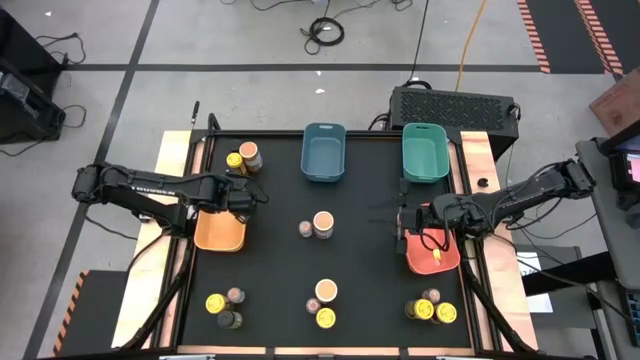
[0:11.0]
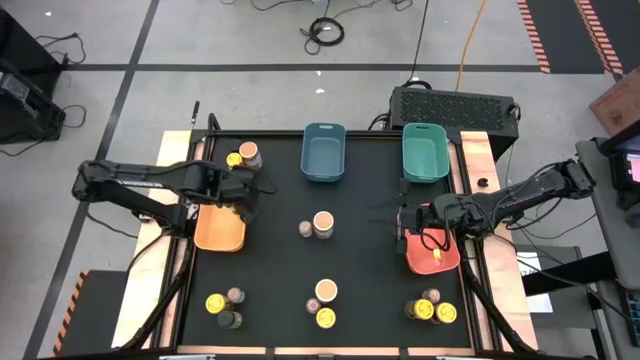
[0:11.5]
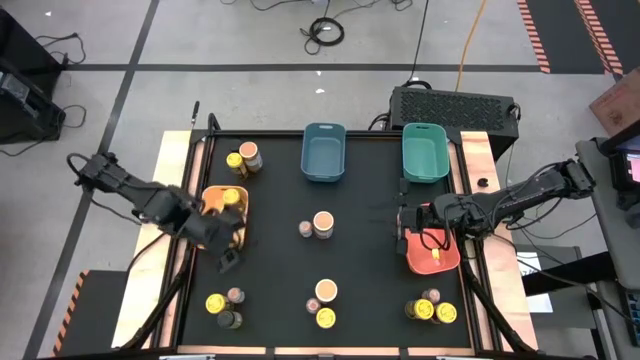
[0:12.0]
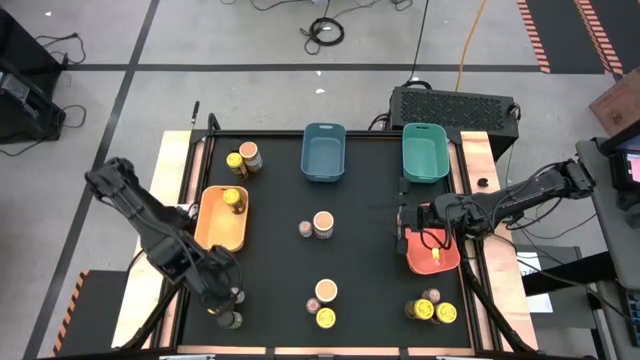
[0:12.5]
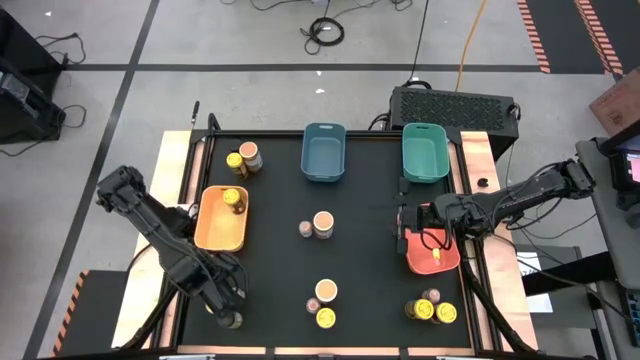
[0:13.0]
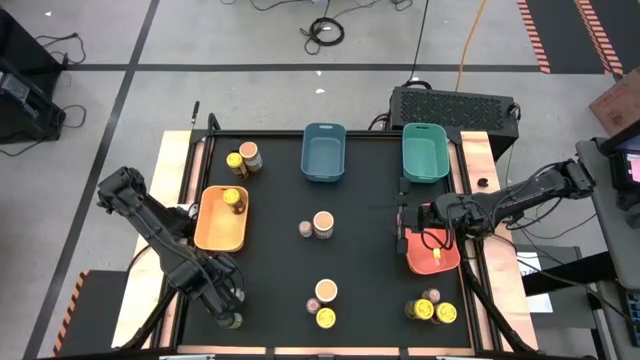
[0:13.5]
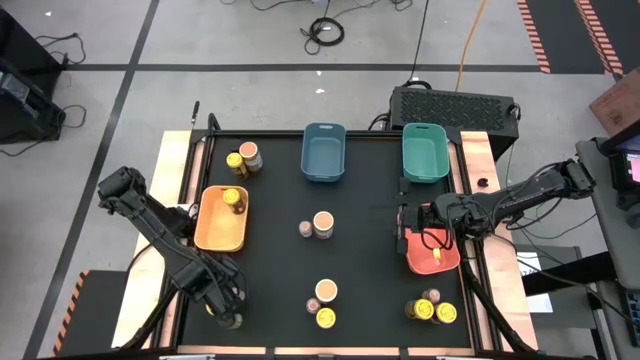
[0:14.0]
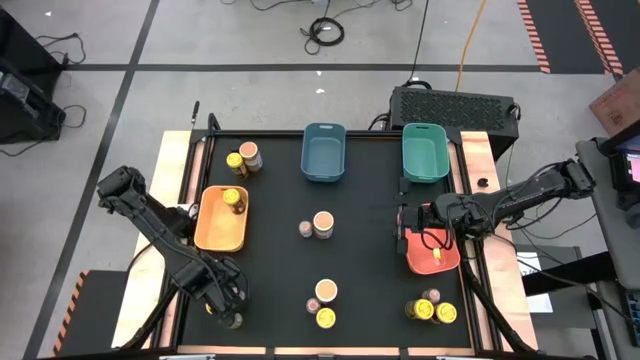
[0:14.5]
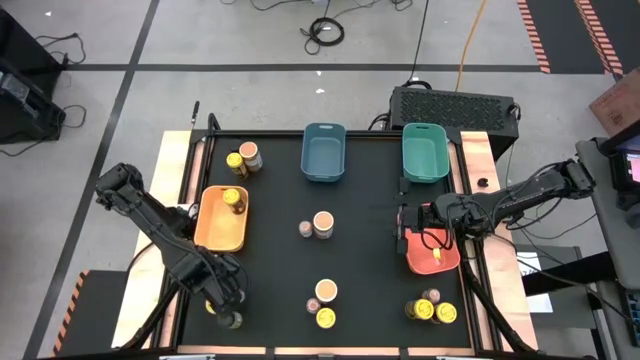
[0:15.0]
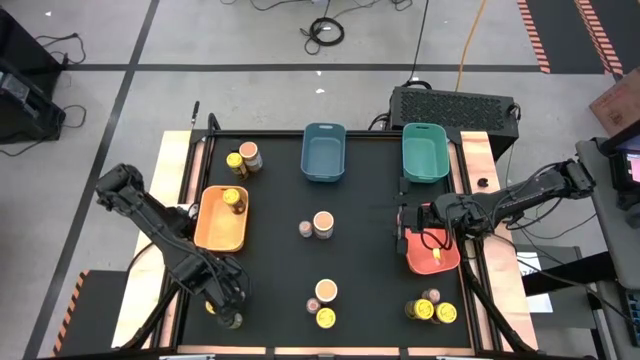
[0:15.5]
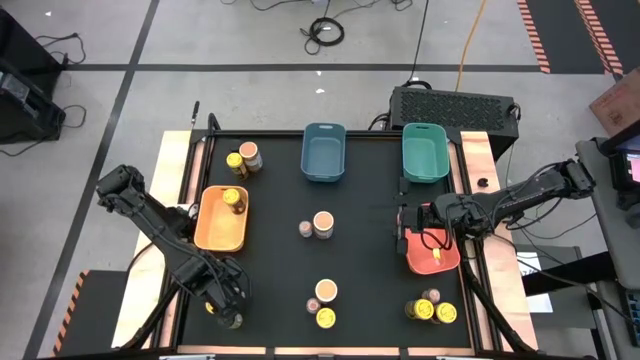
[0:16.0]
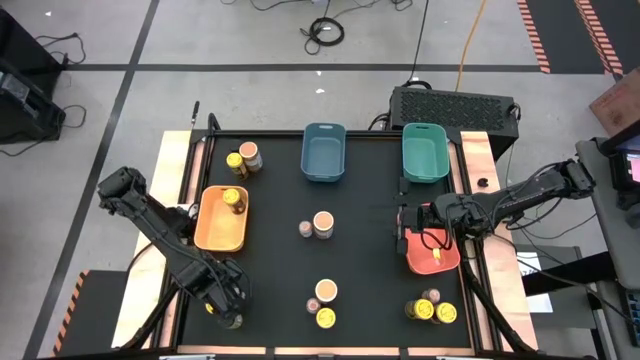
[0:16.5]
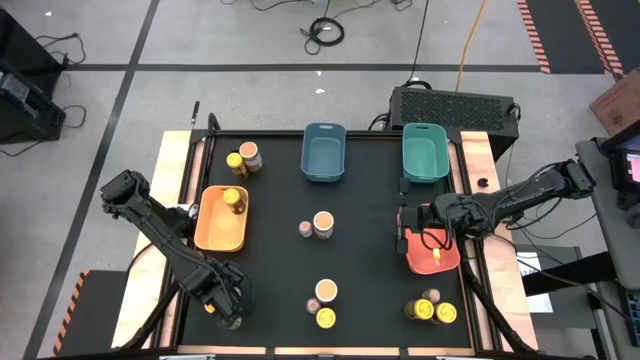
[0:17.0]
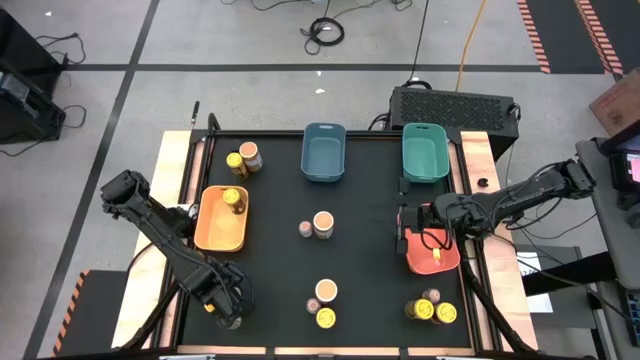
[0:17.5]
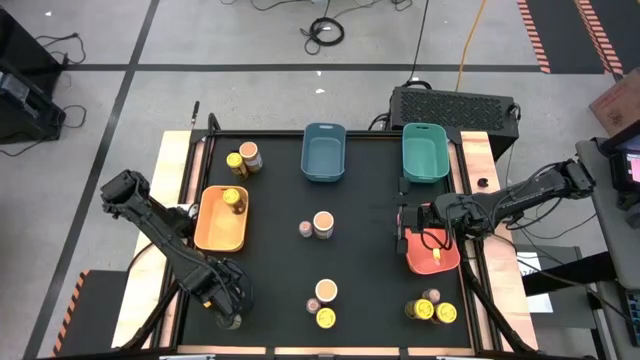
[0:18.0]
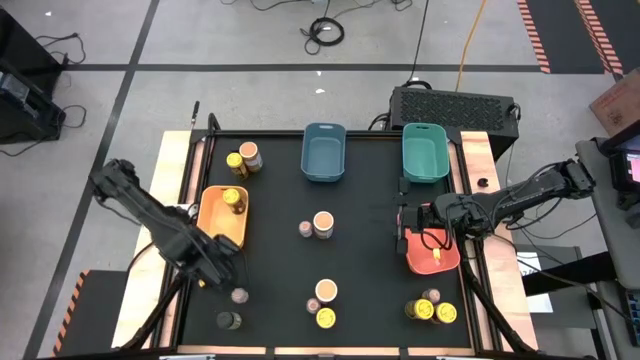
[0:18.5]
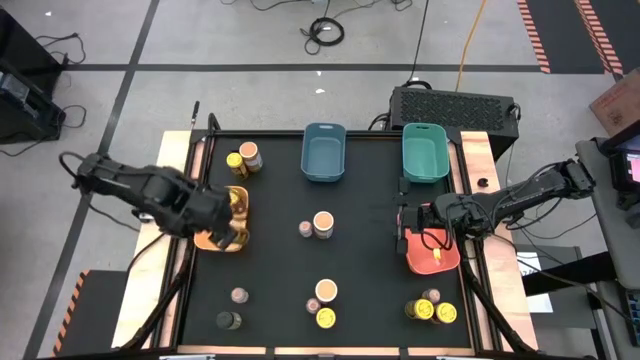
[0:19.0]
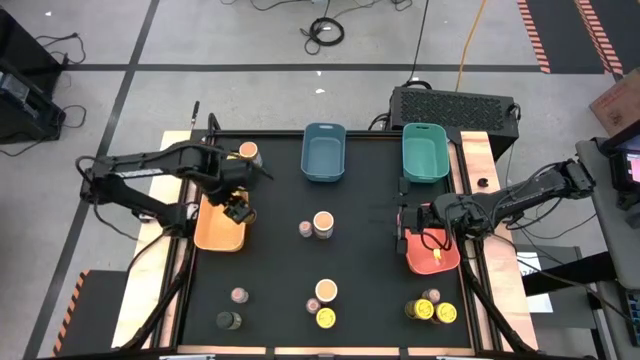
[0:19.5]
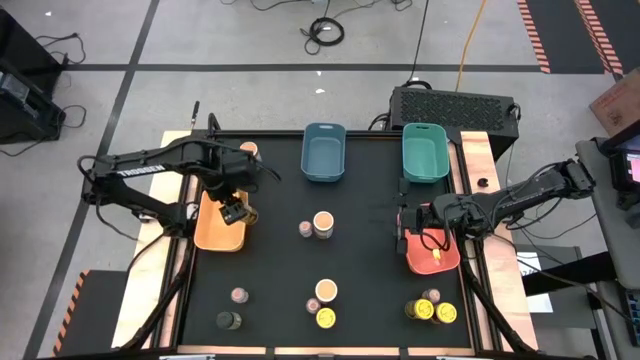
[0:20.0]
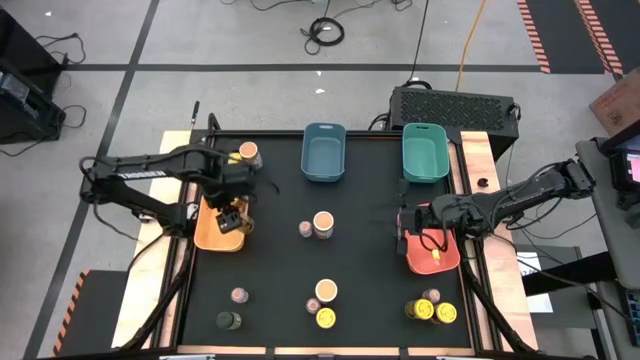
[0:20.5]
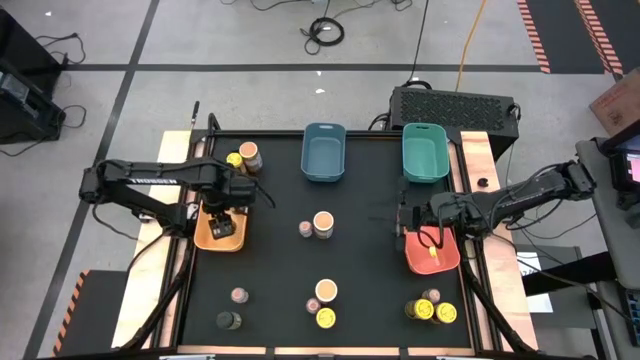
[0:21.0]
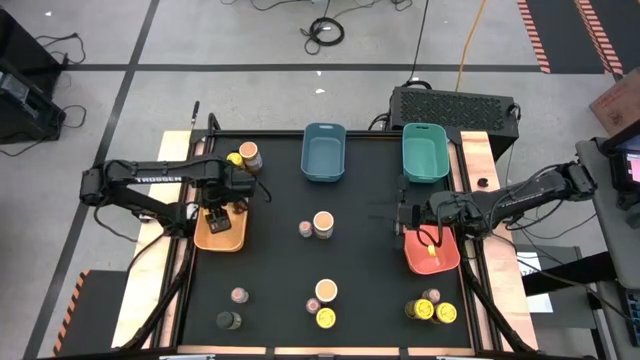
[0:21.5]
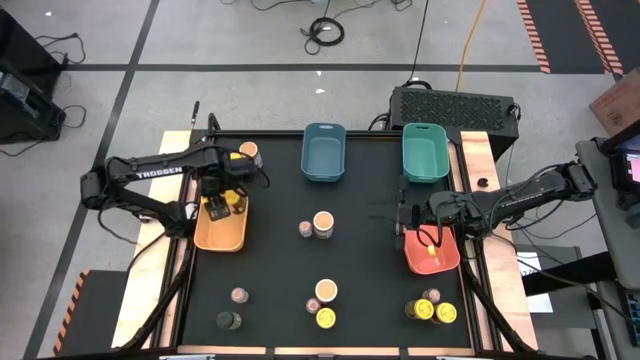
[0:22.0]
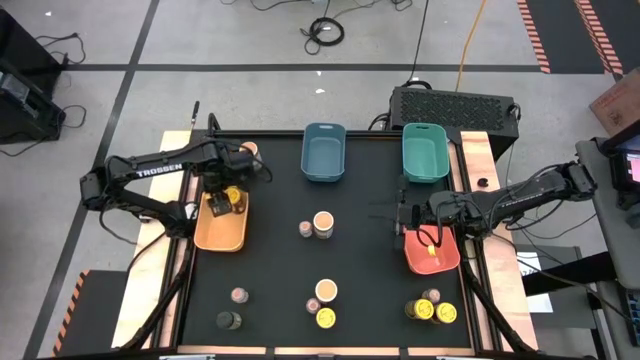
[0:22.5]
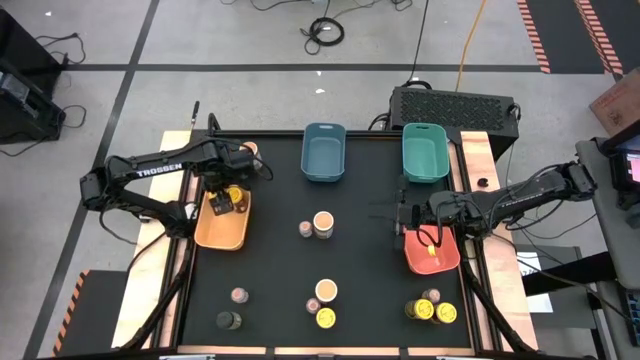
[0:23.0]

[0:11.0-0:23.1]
Task: Sort spices by type
Put the yellow seasoning can into the yellow bin

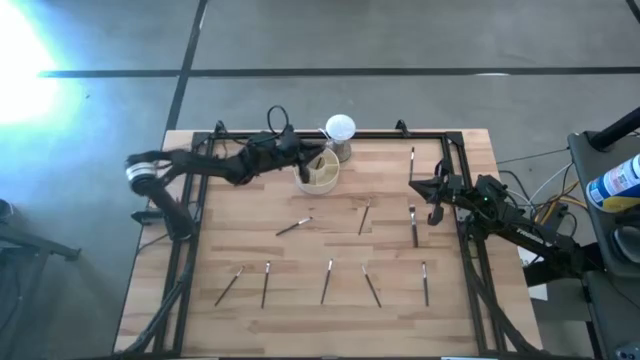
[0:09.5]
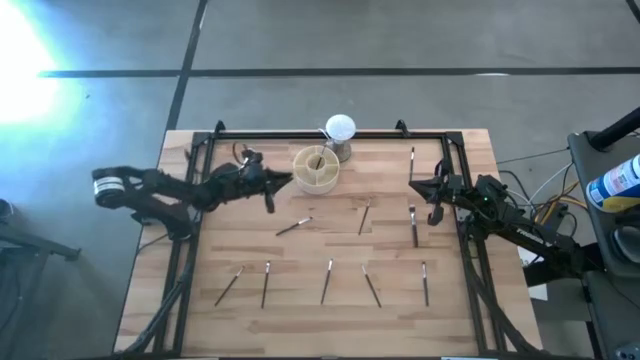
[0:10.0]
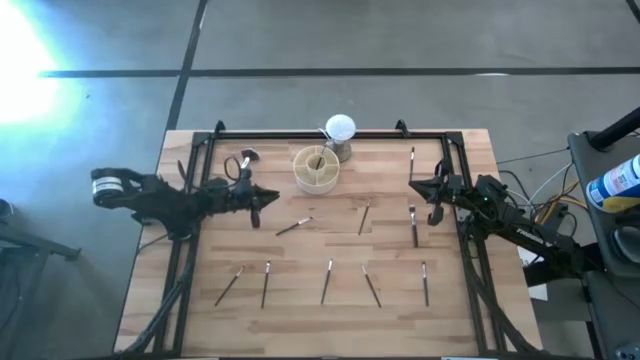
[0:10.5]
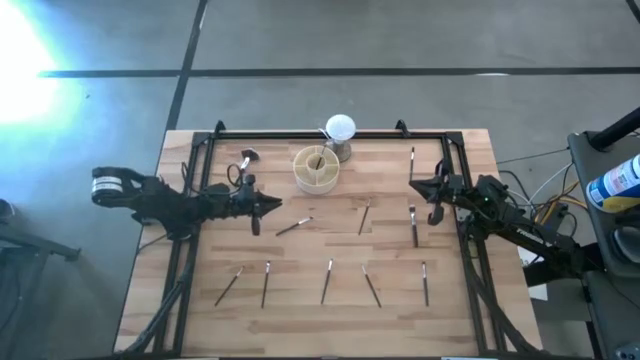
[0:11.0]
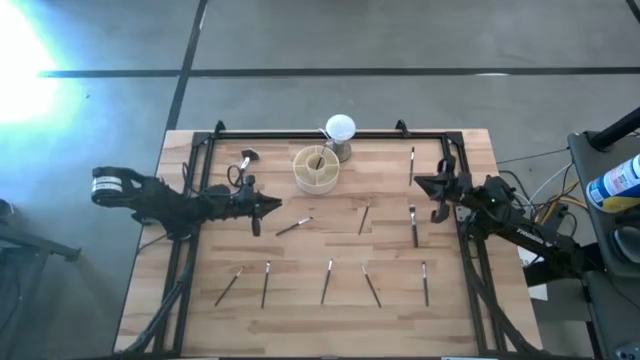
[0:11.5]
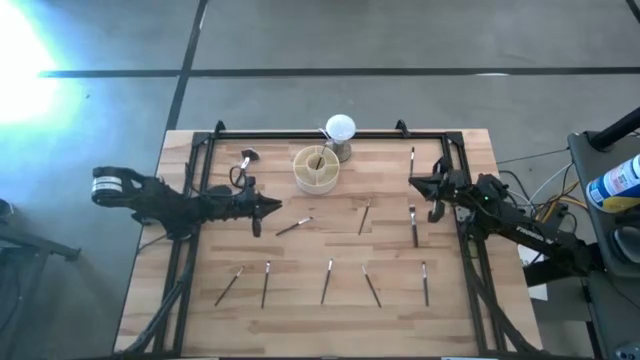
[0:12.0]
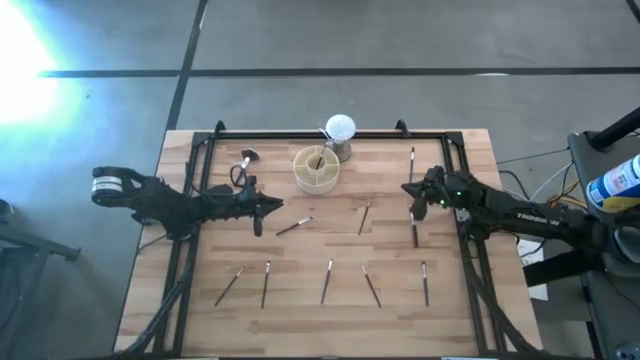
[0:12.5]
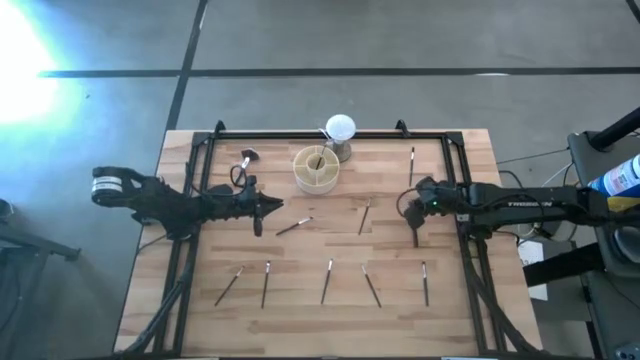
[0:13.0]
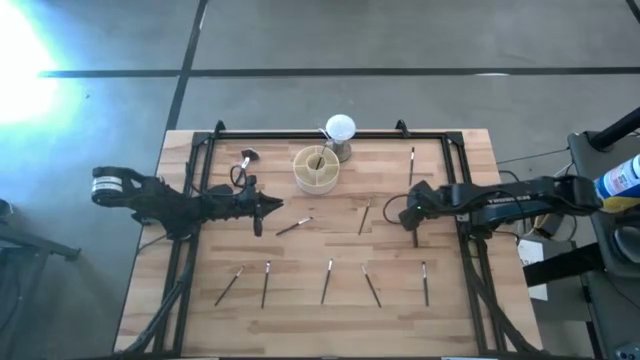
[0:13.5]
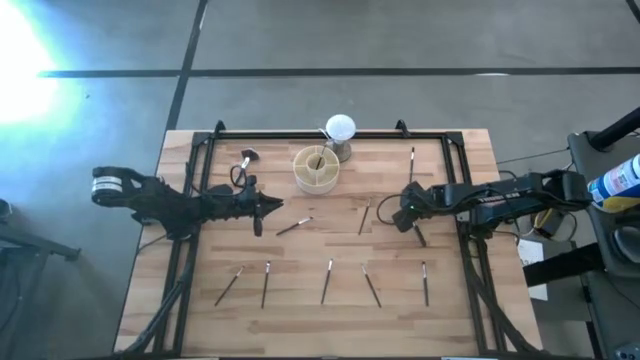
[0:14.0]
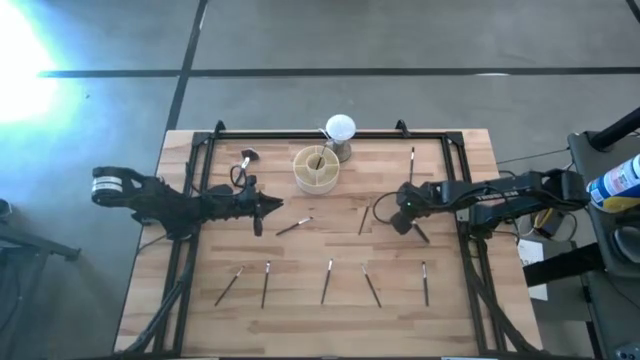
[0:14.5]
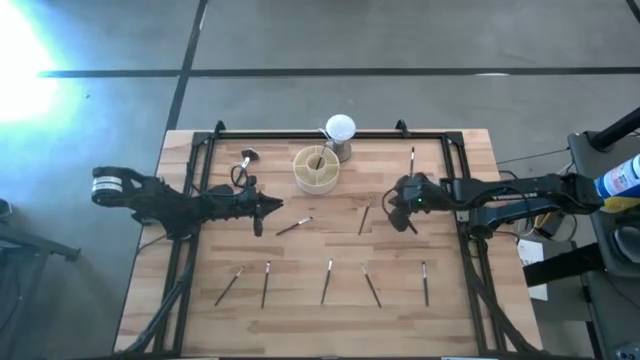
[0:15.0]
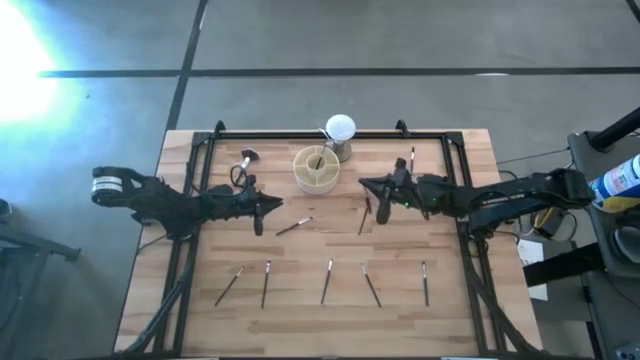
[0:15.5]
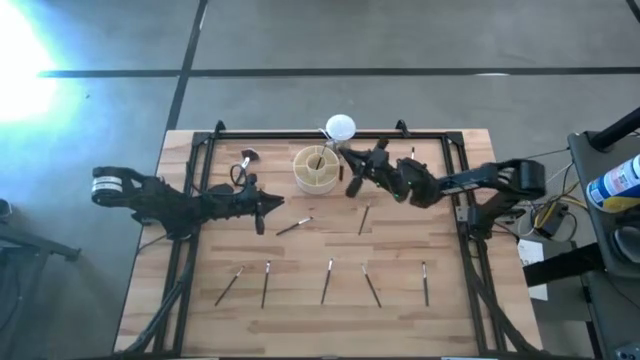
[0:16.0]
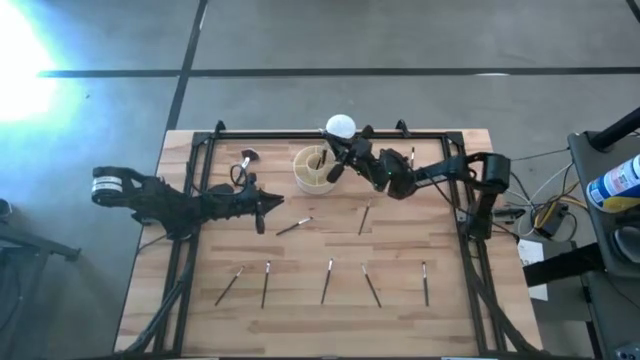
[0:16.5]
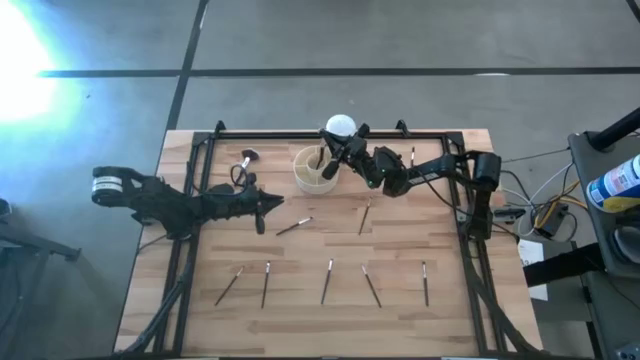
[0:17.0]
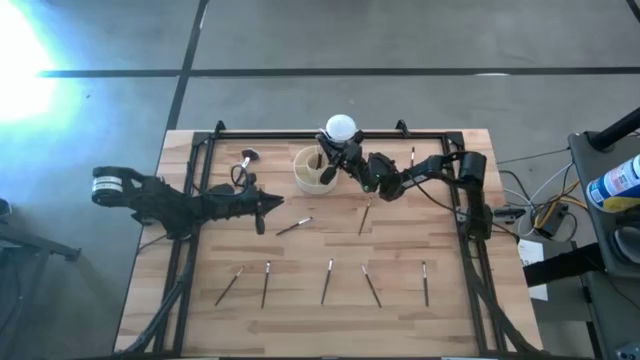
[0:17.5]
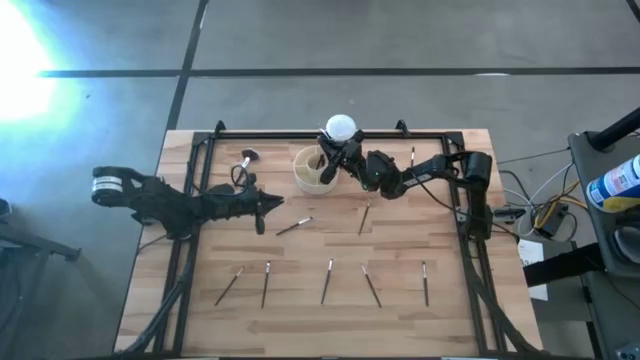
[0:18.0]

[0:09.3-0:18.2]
Task: Put items in baskets/containers
Put the black blush brush into the white organizer
